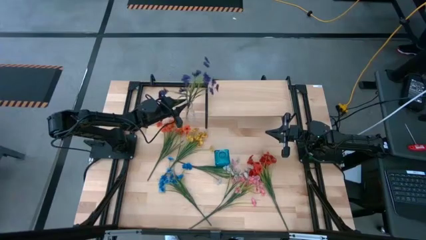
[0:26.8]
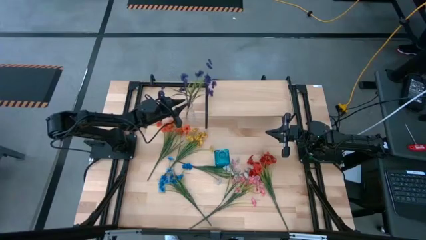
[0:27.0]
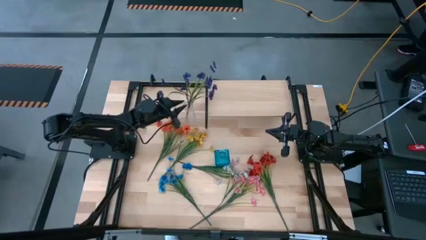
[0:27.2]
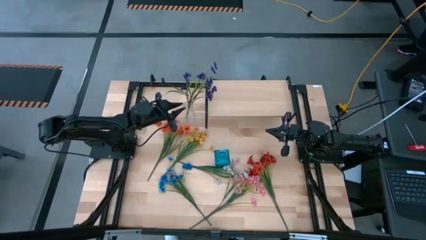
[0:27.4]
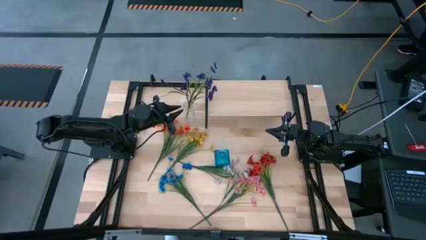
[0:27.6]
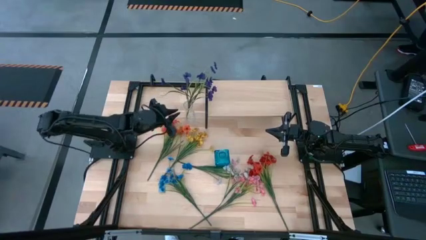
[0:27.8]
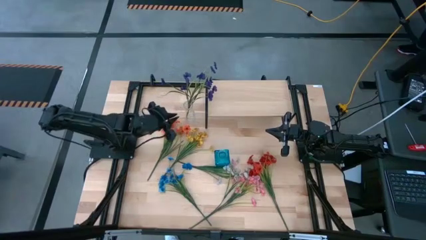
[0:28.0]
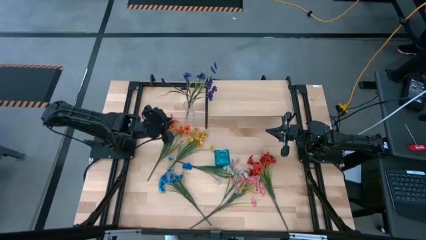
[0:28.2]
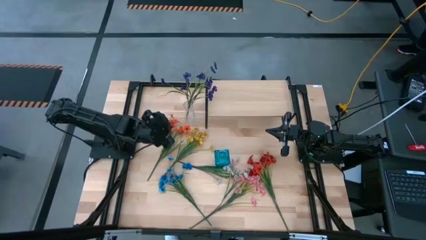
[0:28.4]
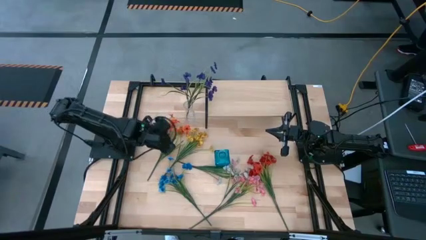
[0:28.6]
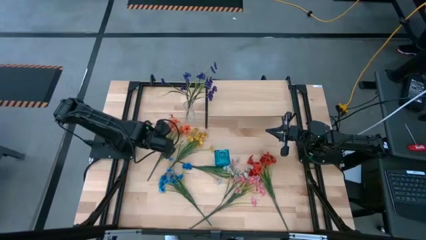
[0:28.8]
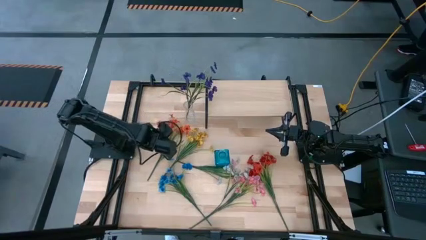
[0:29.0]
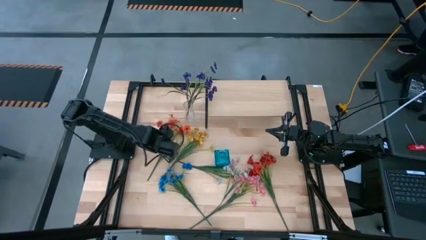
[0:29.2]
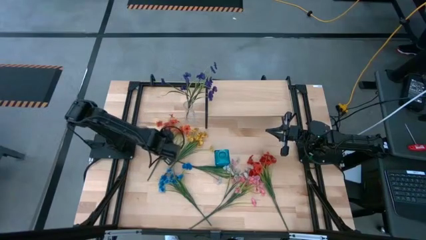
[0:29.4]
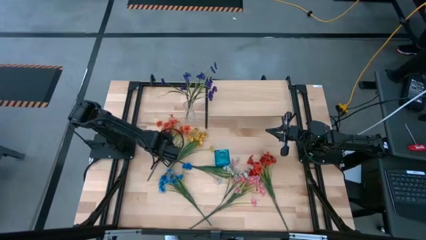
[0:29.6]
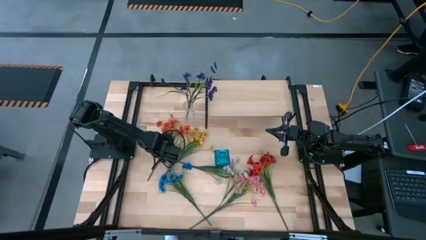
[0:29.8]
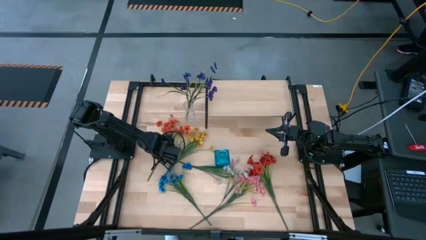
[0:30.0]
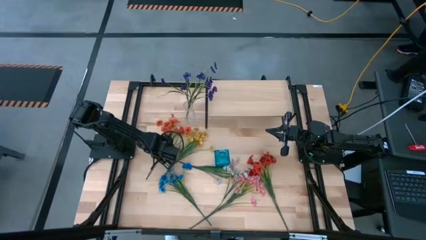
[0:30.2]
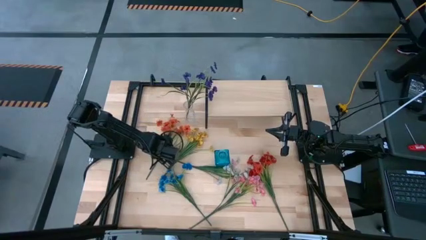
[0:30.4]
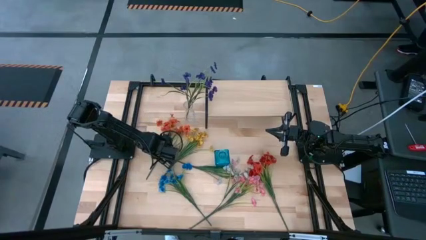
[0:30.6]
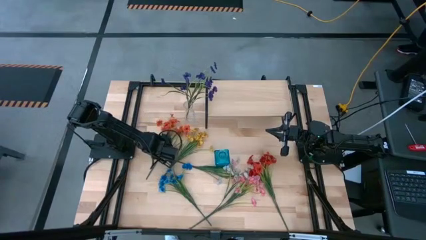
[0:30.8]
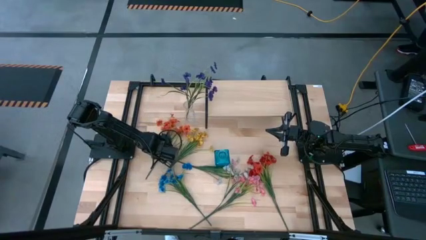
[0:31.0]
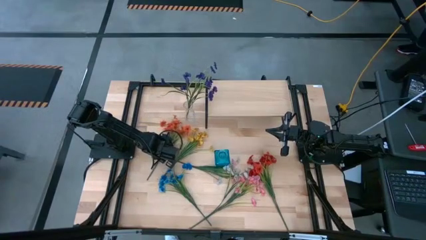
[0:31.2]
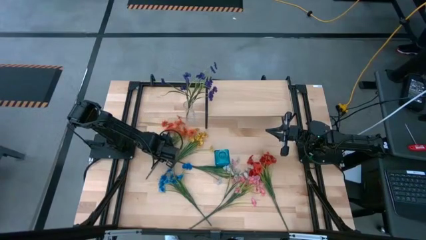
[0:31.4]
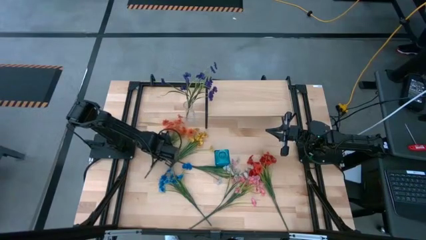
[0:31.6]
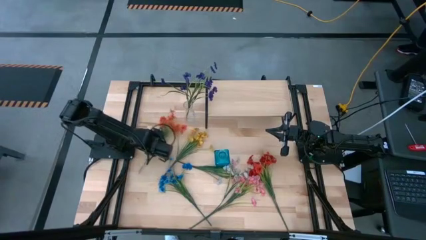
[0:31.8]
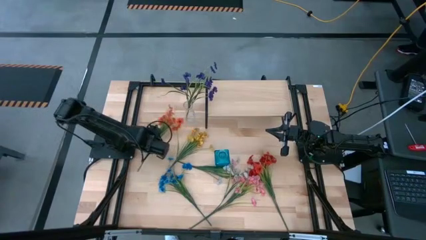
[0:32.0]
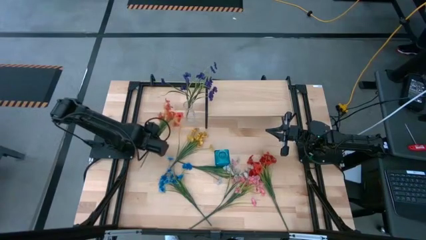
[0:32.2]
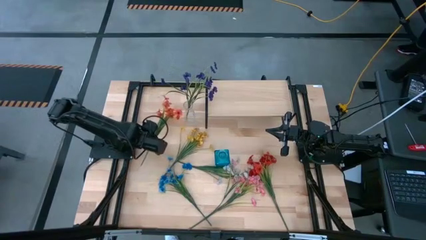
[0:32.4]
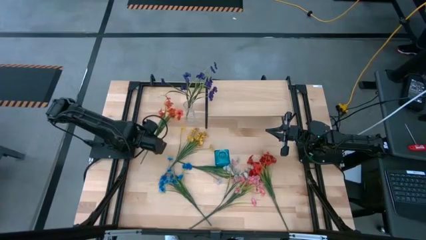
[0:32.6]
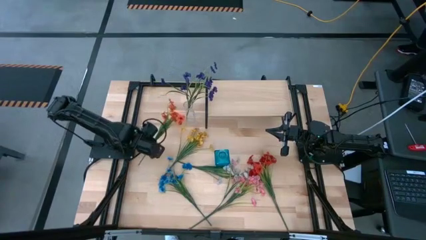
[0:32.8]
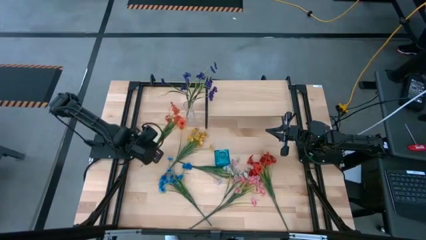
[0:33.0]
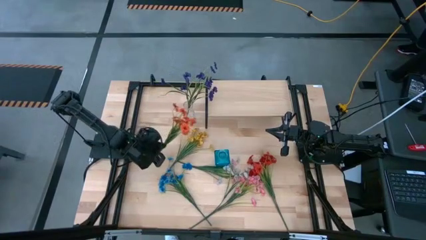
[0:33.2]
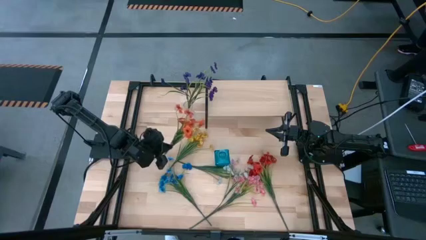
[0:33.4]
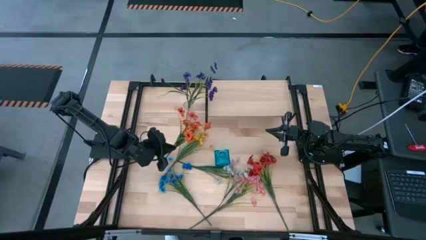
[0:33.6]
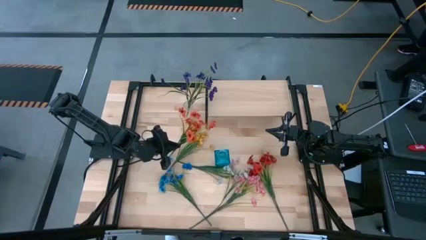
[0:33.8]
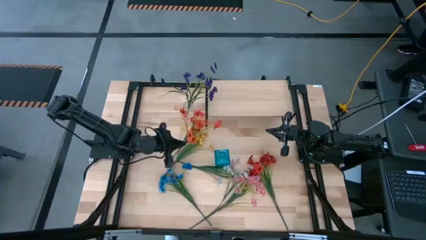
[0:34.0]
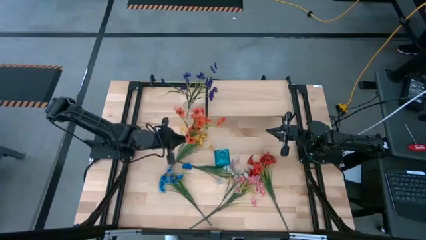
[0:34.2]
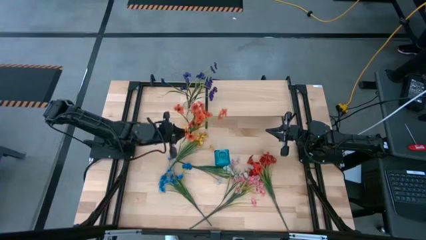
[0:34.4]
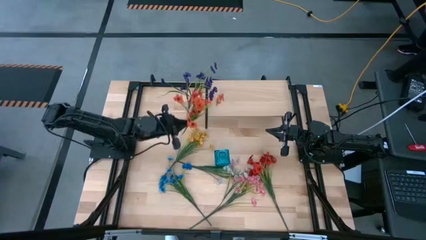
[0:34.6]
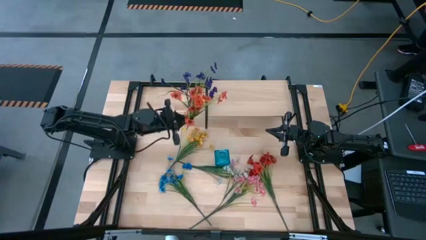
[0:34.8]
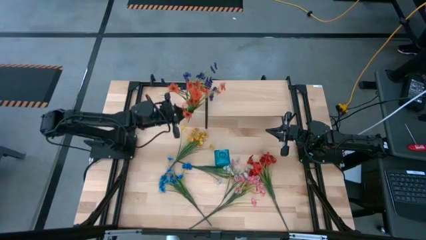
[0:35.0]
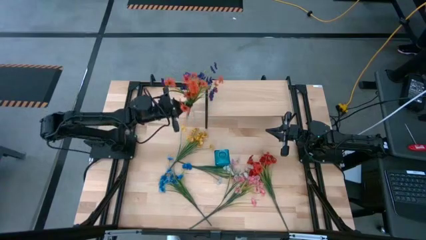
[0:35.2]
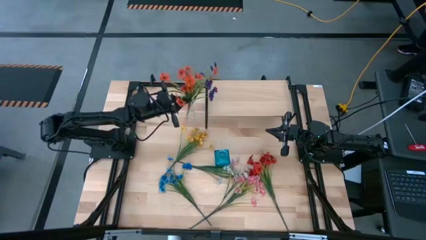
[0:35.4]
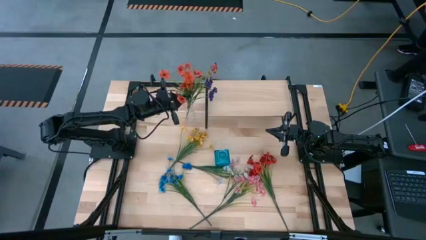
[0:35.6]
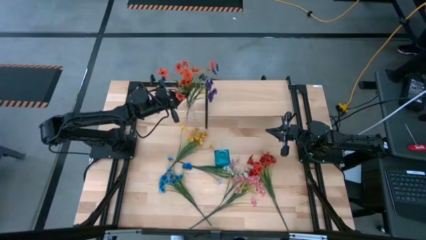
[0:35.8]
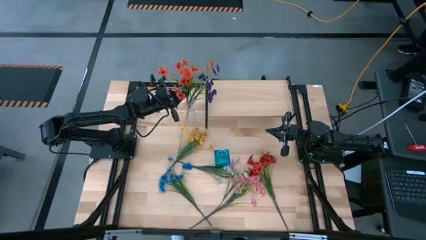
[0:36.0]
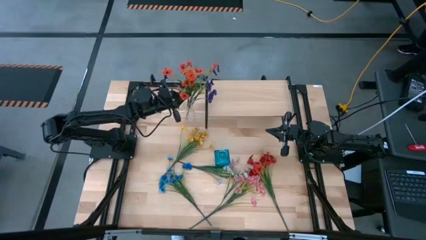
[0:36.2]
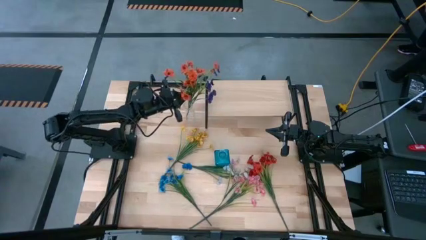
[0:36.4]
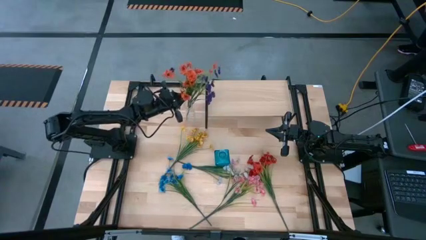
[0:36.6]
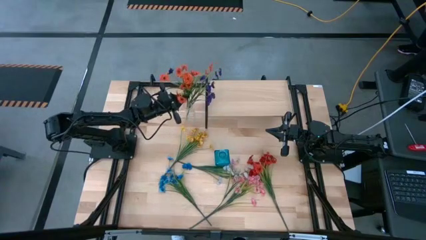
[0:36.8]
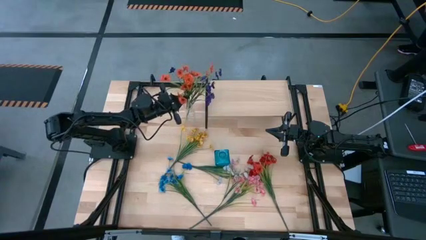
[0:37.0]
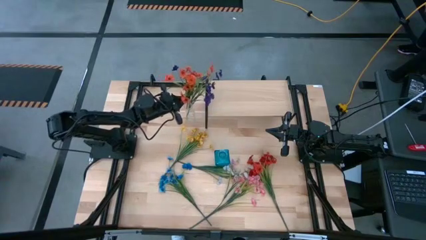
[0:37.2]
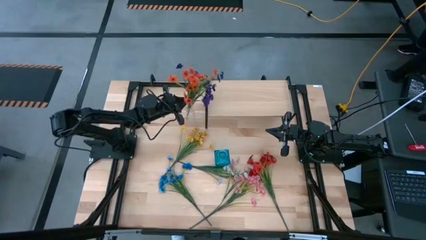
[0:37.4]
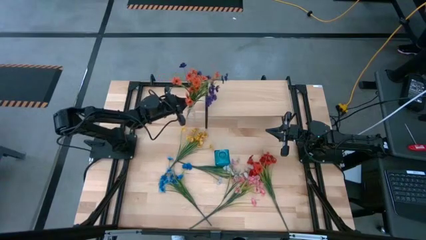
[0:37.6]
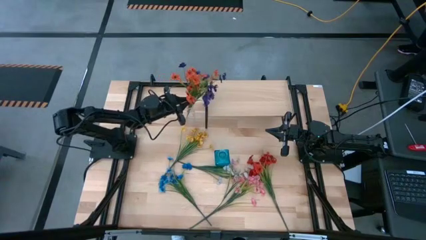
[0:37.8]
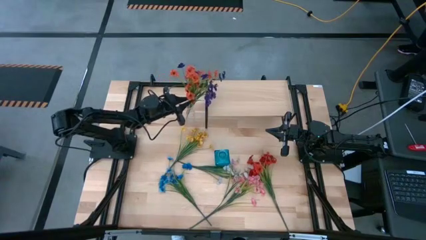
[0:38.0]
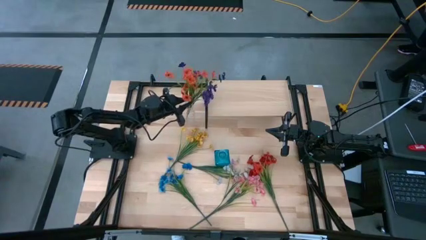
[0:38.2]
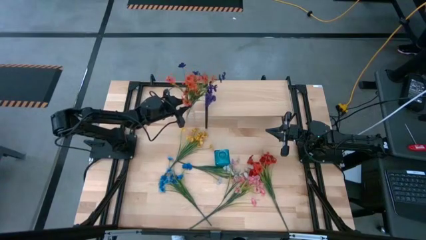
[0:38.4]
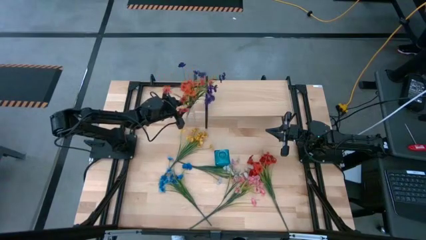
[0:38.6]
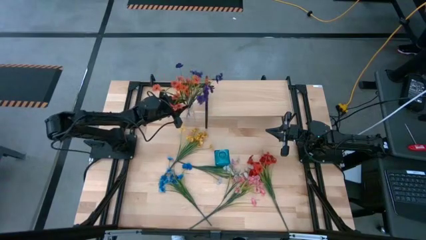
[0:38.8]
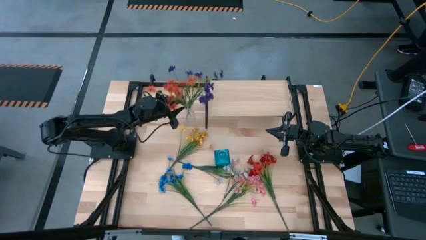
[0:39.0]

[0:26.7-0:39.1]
Task: Pick and place flowers into a vace then onto a shelf
Put the orange flowers into the transparent vase
